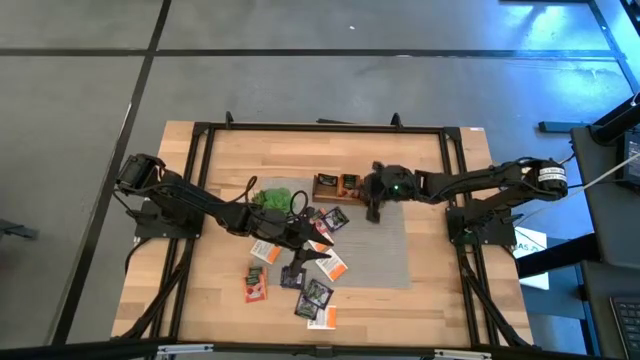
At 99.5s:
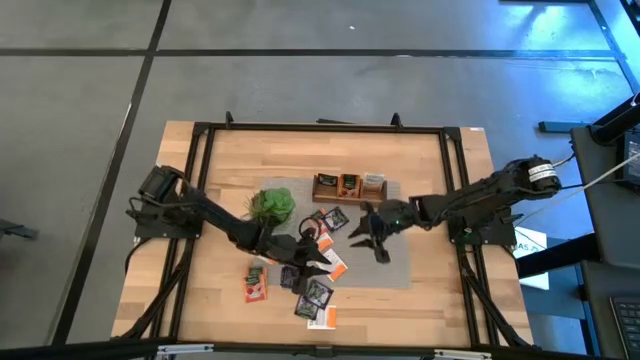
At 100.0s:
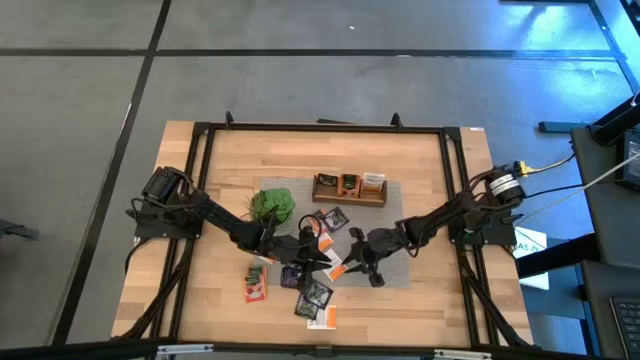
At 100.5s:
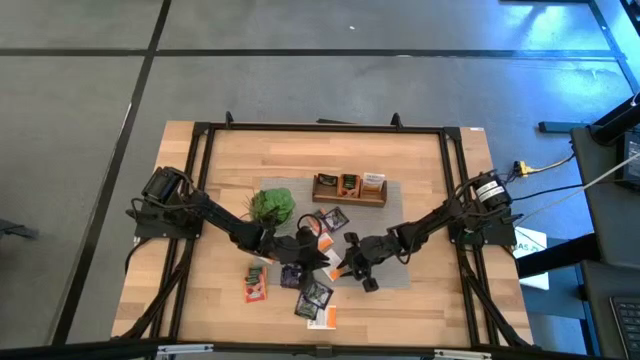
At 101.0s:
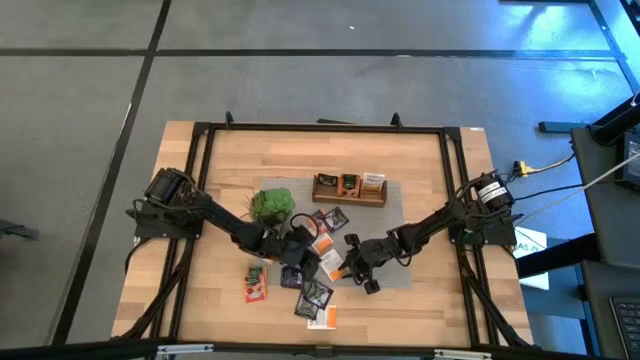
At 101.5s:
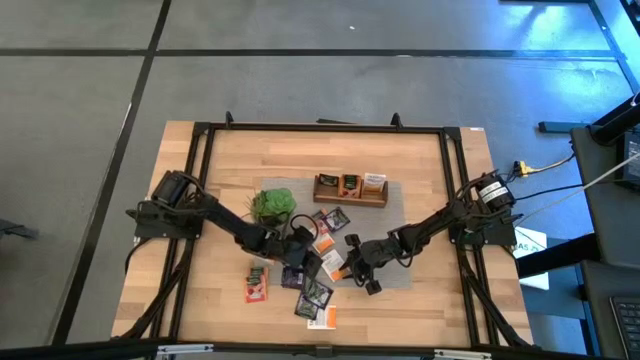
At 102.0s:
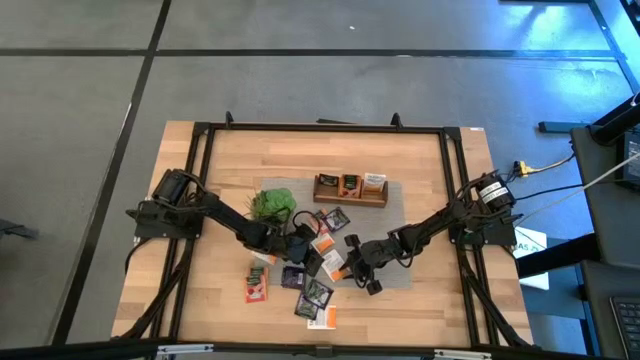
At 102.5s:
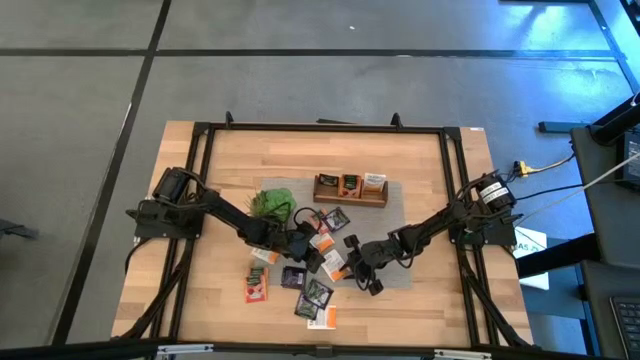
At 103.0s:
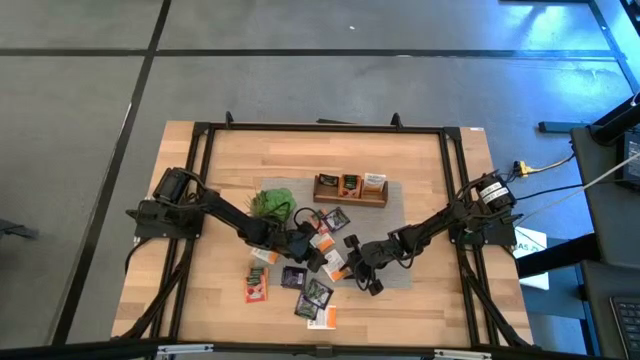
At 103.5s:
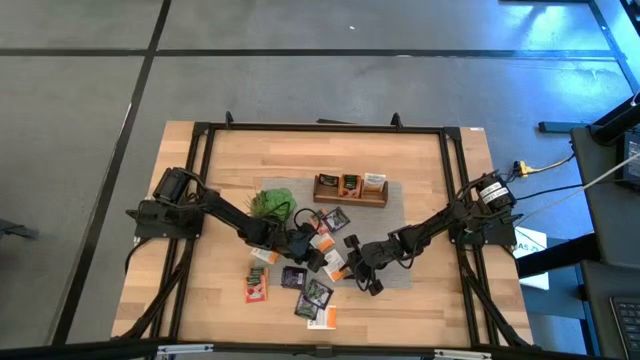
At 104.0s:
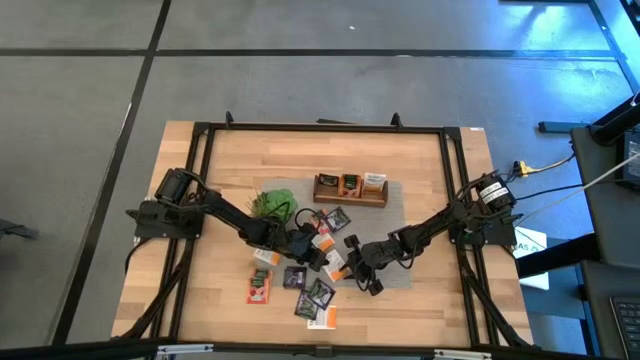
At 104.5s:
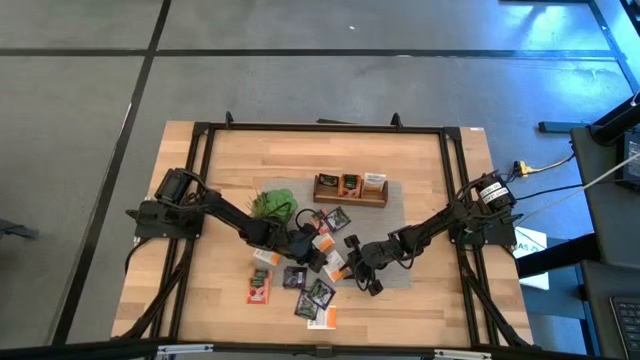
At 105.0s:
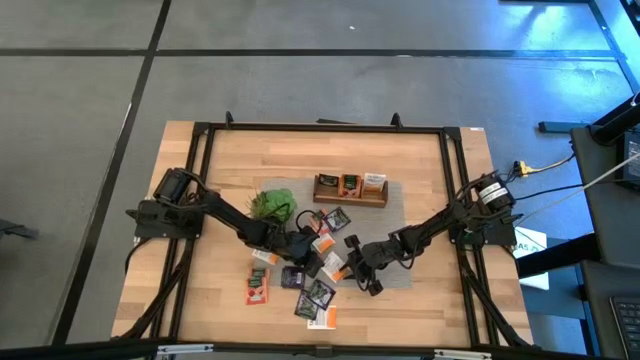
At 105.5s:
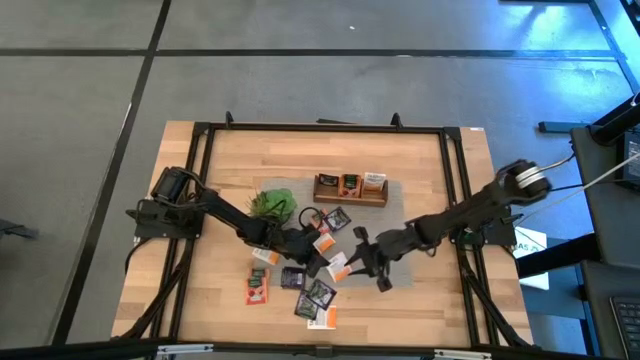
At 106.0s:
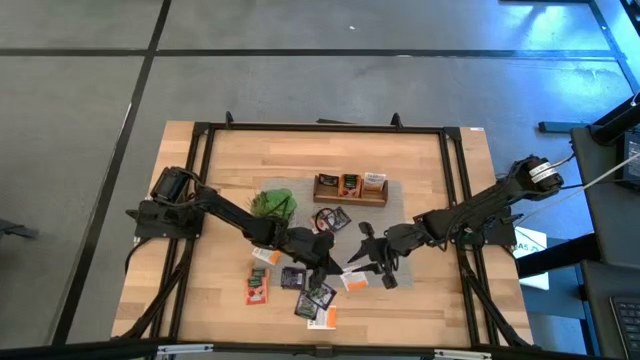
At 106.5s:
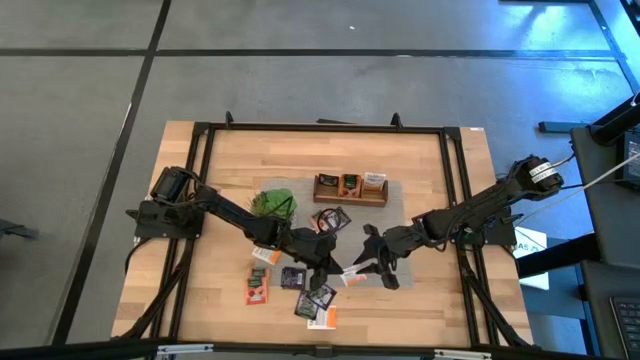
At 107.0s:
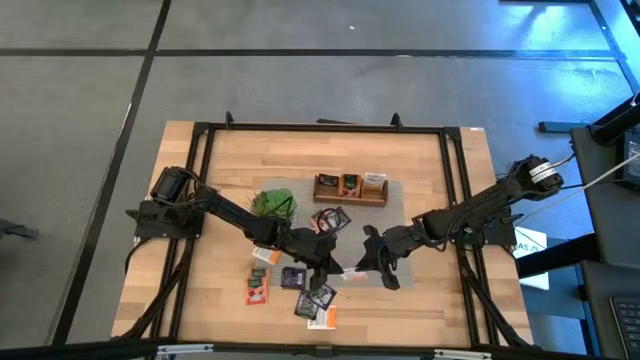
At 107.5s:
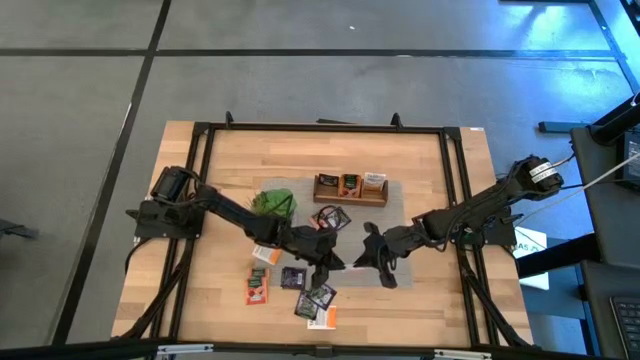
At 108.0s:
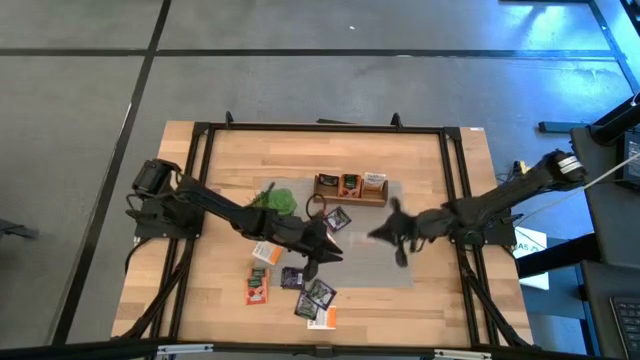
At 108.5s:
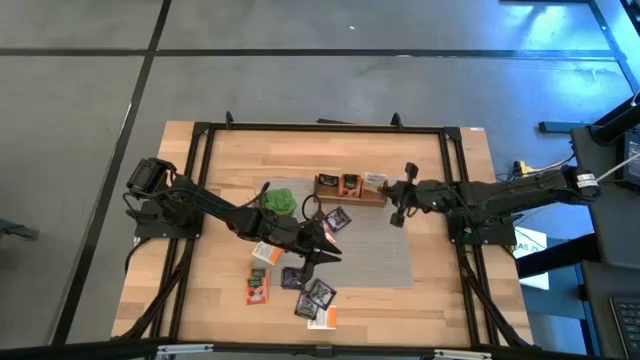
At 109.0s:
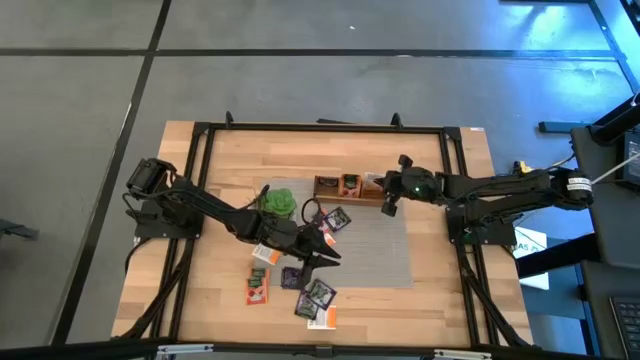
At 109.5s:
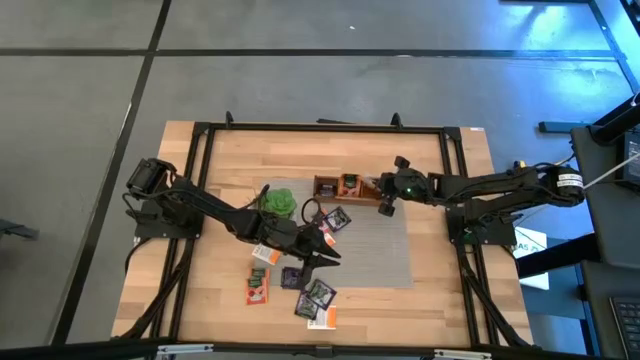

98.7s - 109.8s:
Task: Pick & Place Tea
Put the white tea bag into the right section of the wooden organizer

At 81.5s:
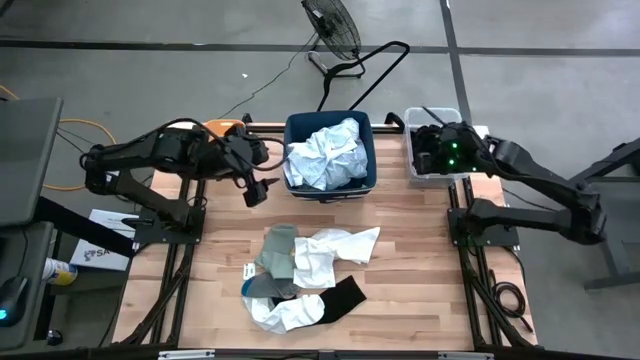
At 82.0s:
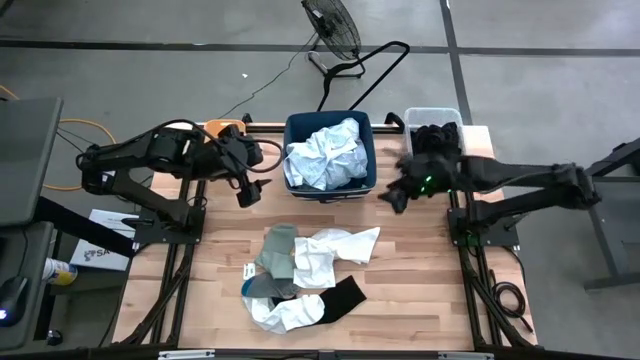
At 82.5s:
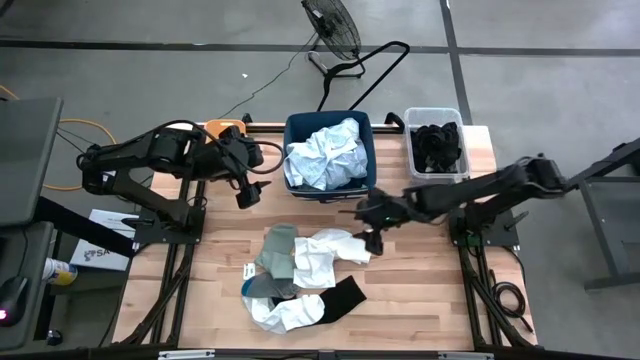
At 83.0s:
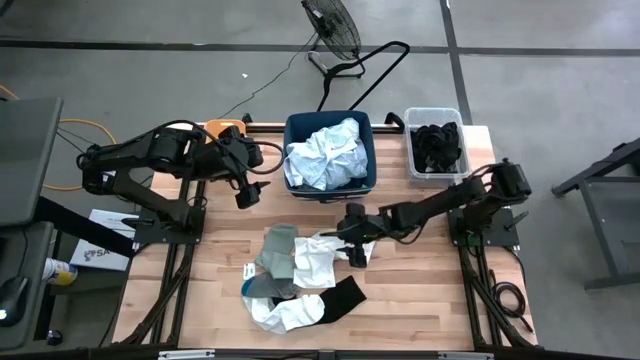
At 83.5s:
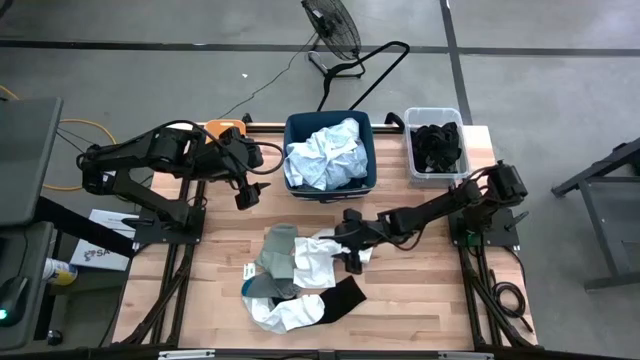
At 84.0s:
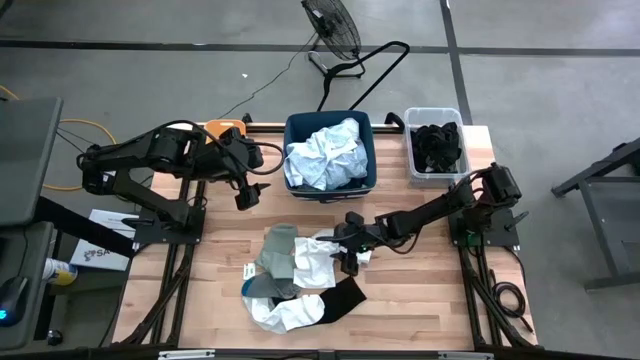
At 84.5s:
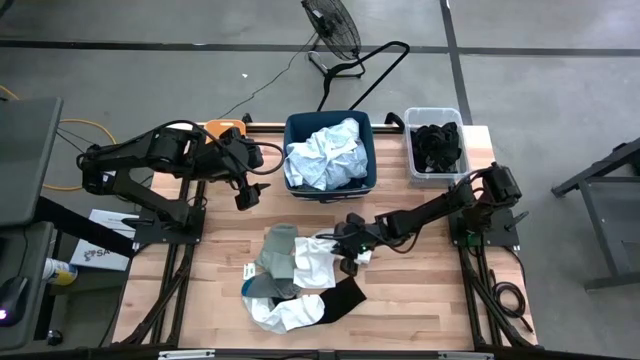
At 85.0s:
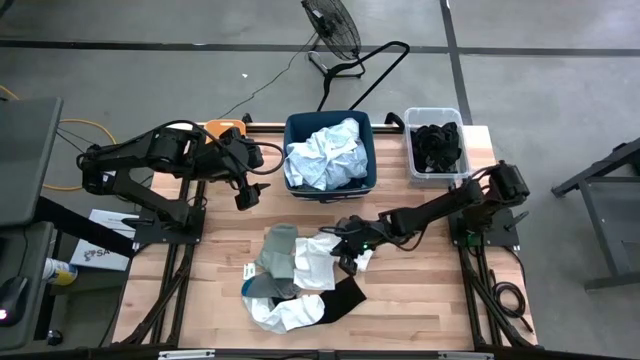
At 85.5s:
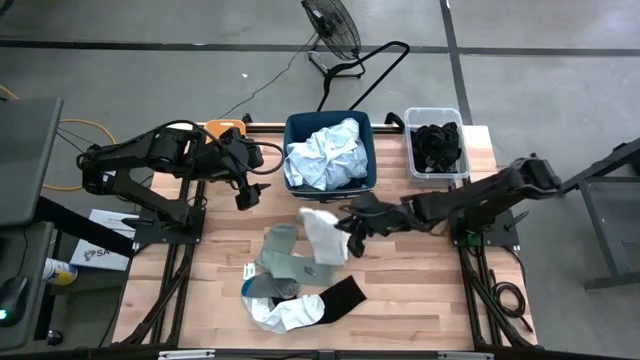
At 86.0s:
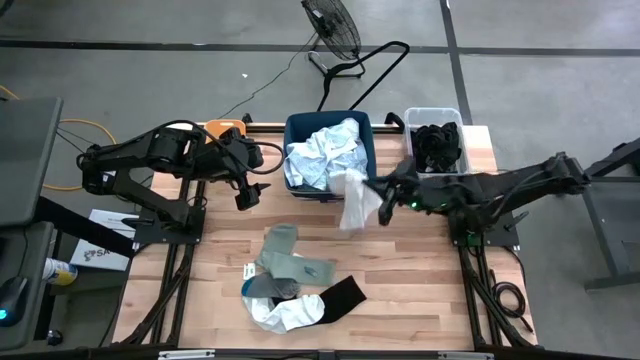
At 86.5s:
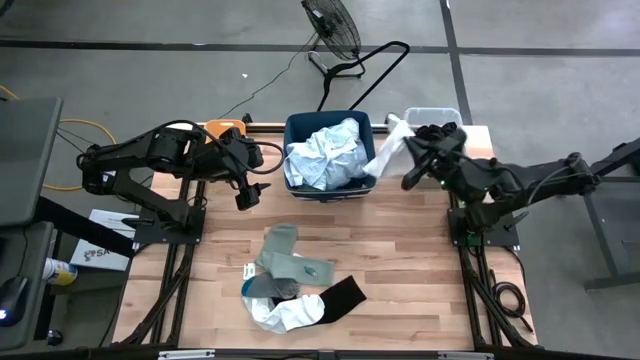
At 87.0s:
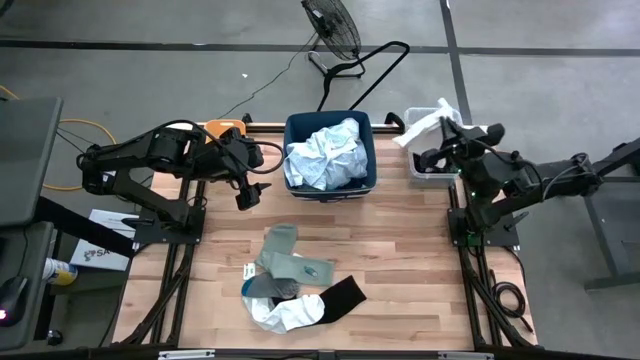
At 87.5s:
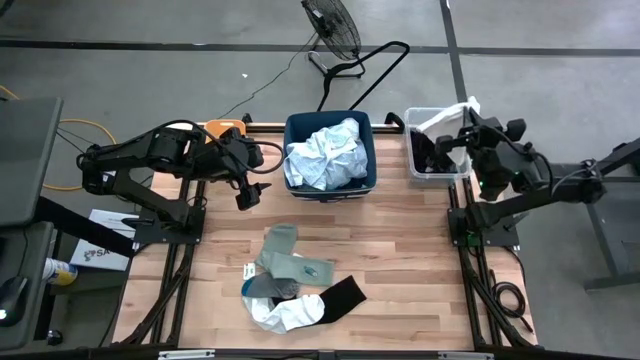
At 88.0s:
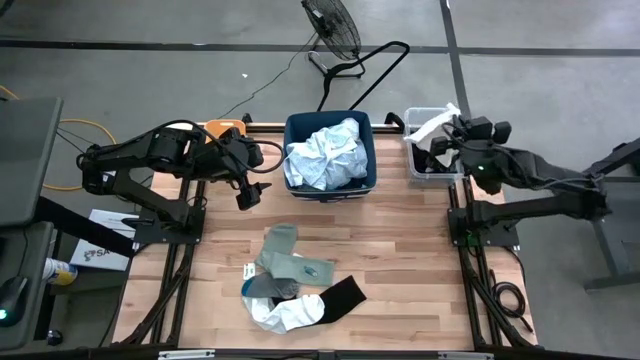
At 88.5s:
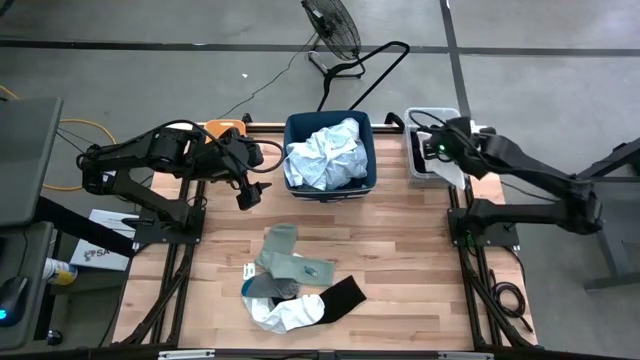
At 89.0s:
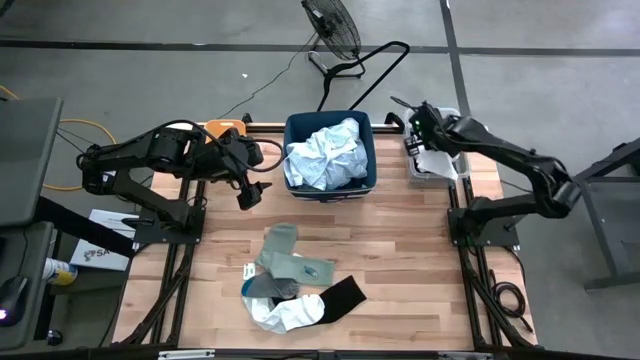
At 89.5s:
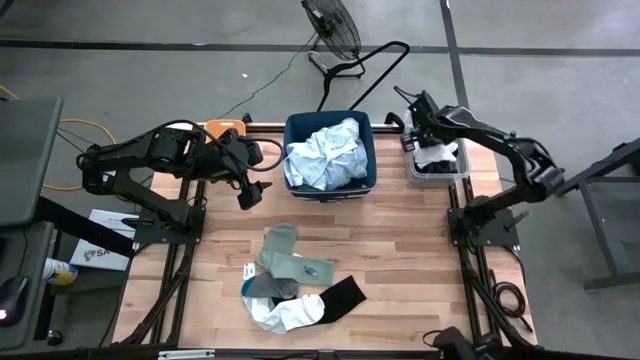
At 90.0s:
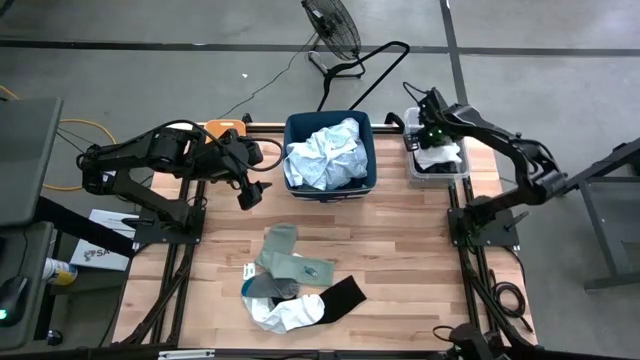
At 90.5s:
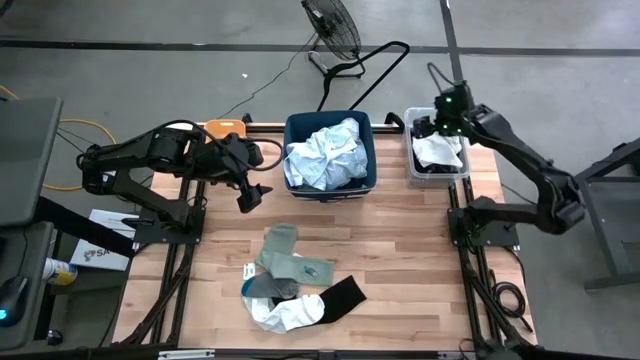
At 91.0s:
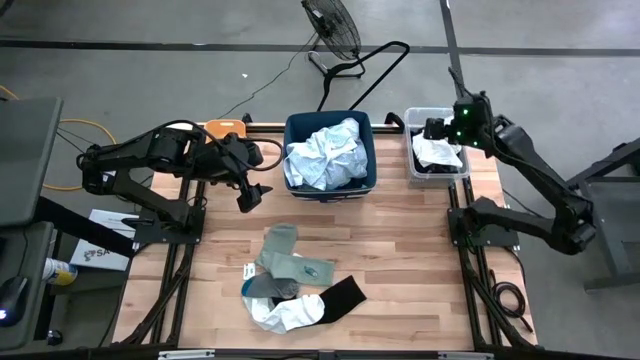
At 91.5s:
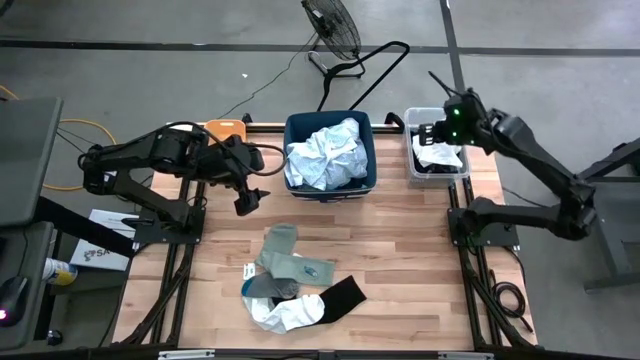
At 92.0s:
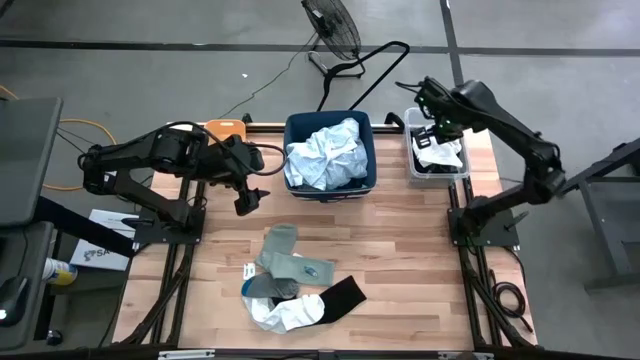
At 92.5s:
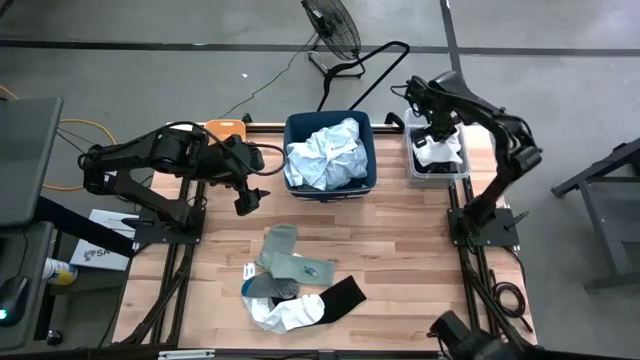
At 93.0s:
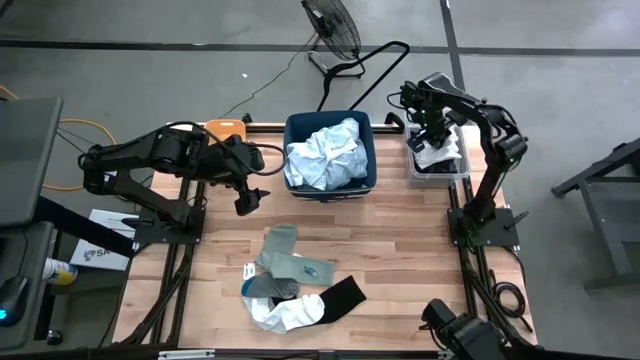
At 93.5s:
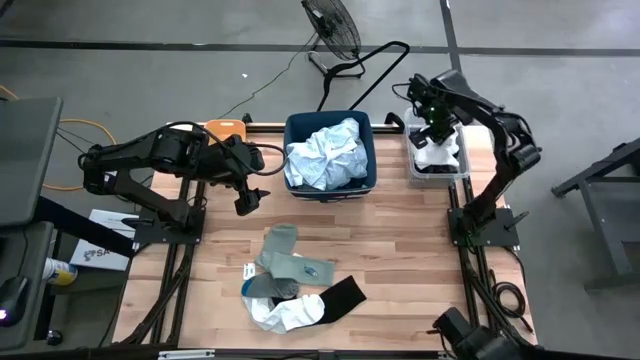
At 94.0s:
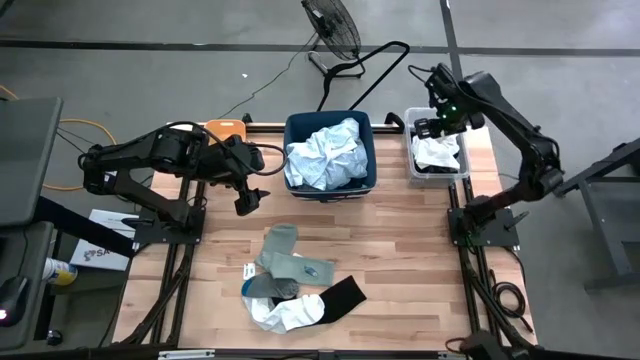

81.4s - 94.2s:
Task: Pick & Place Cloths
Put the white boxers into the transparent bin
